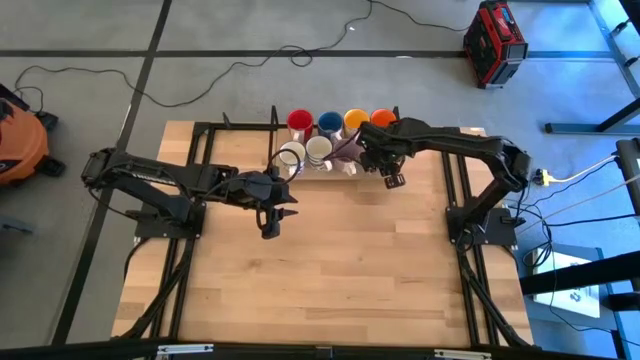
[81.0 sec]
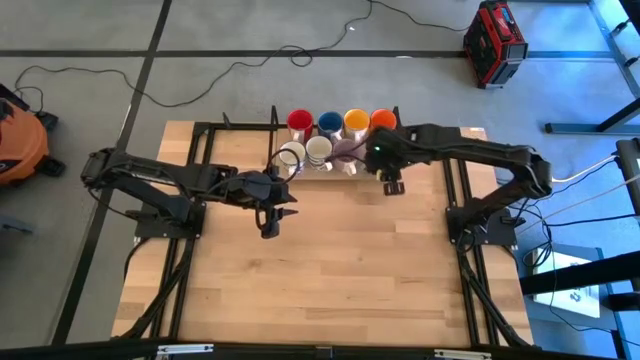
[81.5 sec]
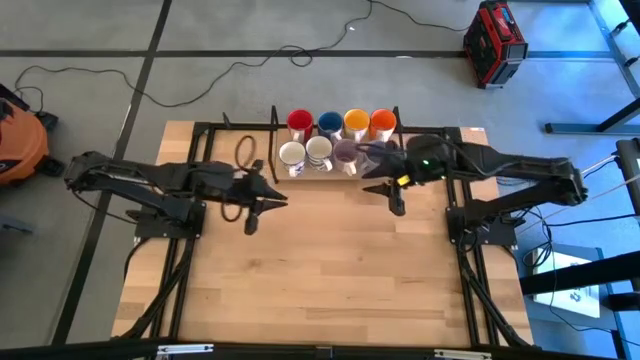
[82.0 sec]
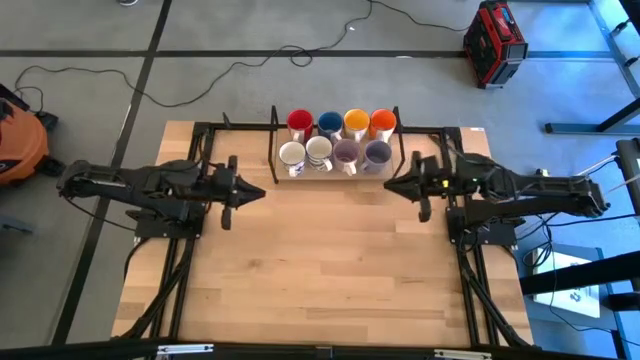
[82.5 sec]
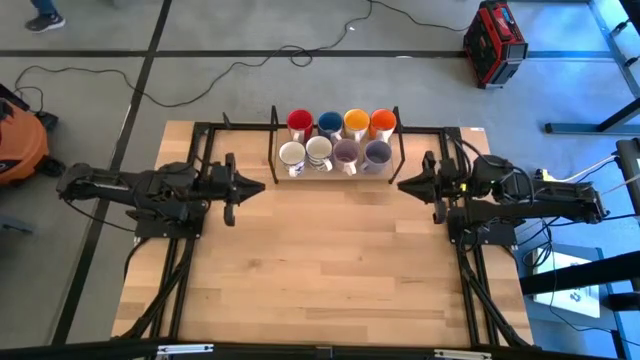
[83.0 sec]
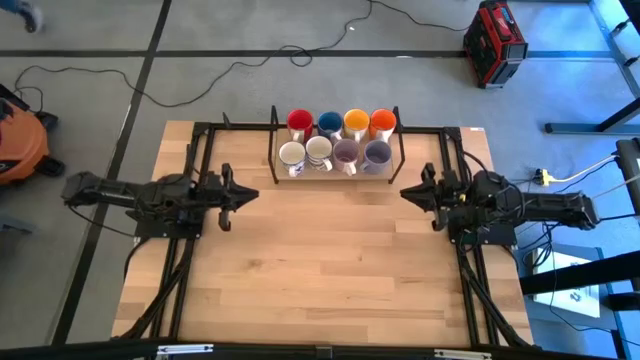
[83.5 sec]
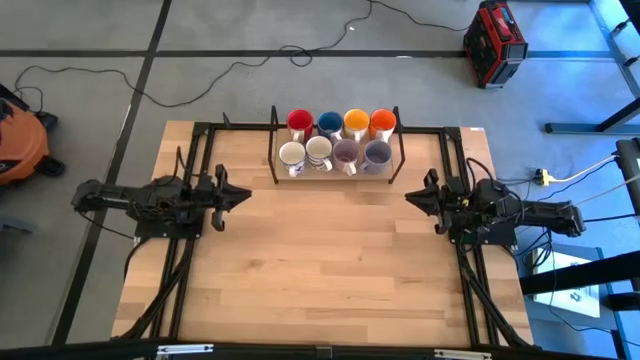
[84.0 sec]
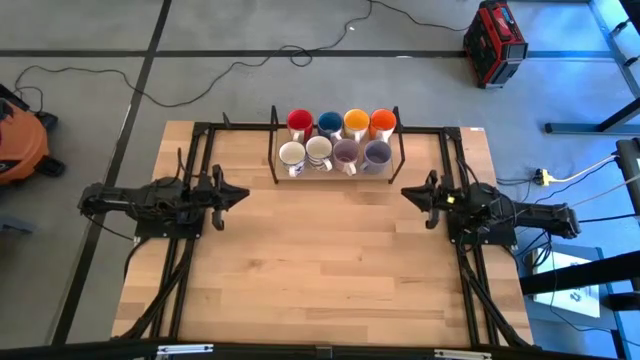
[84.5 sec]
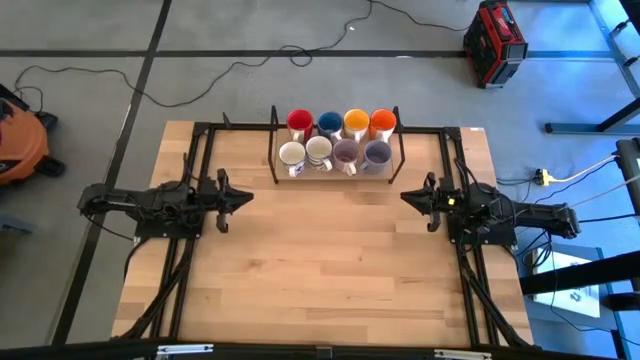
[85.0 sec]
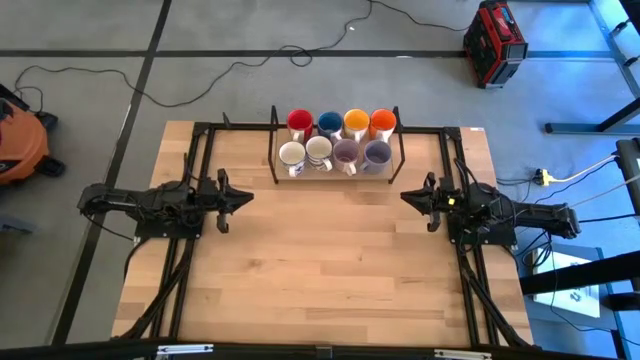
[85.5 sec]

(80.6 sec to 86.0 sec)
Task: Place coffee mugs
Return to Home Position

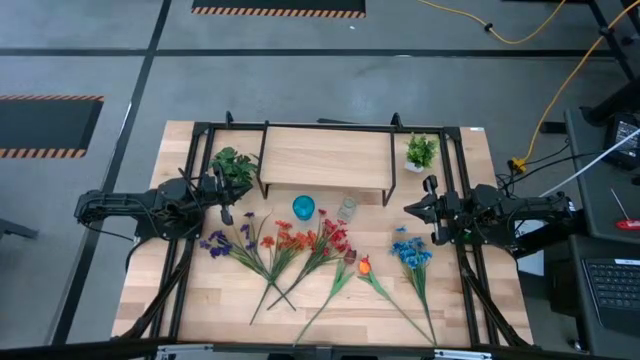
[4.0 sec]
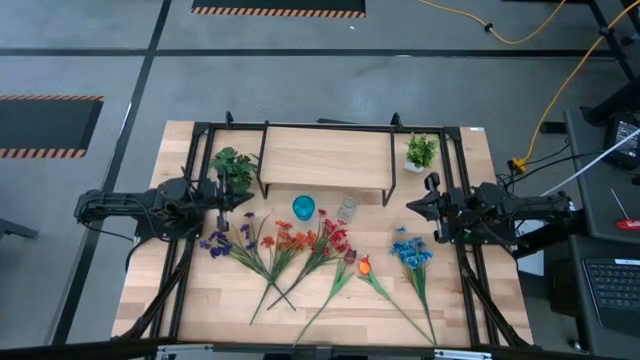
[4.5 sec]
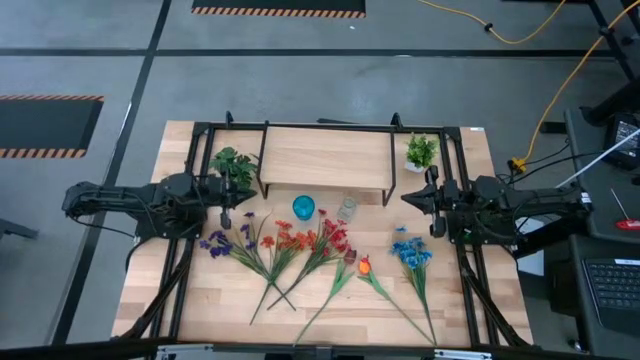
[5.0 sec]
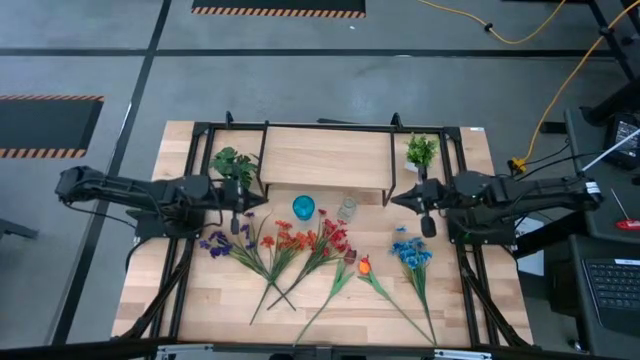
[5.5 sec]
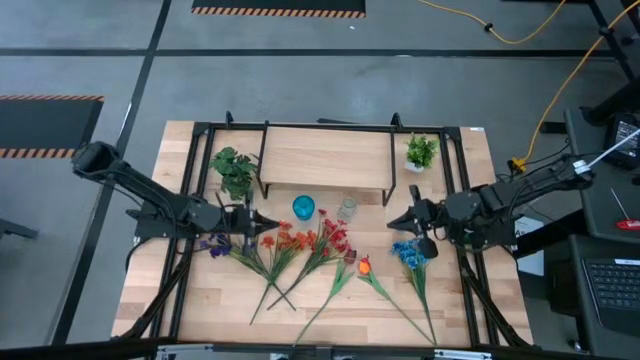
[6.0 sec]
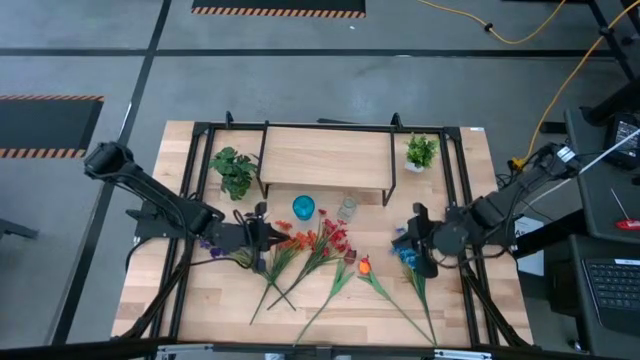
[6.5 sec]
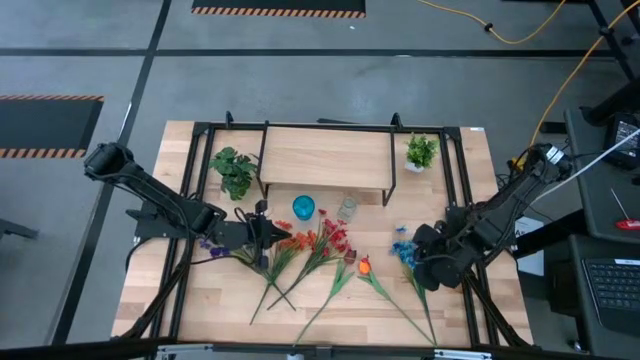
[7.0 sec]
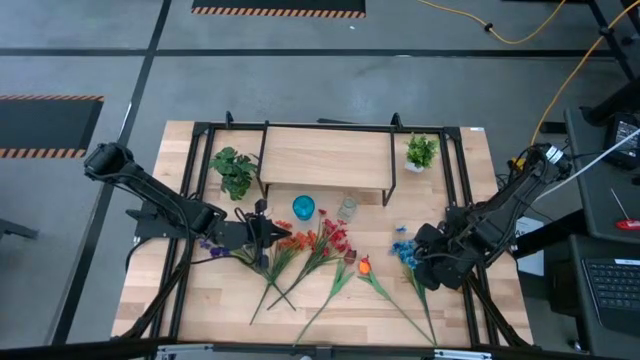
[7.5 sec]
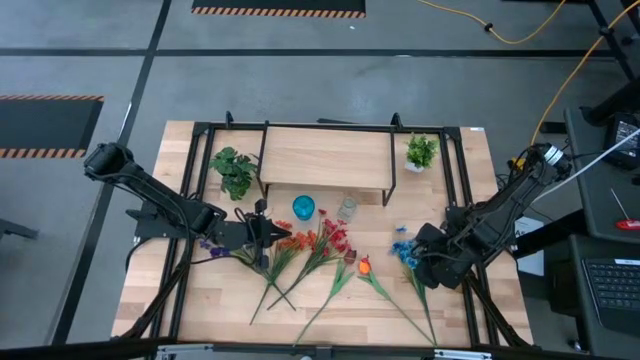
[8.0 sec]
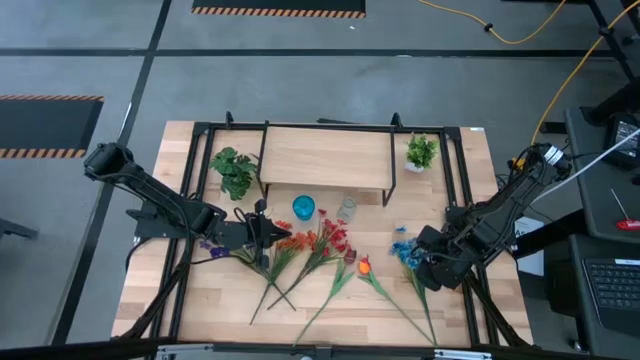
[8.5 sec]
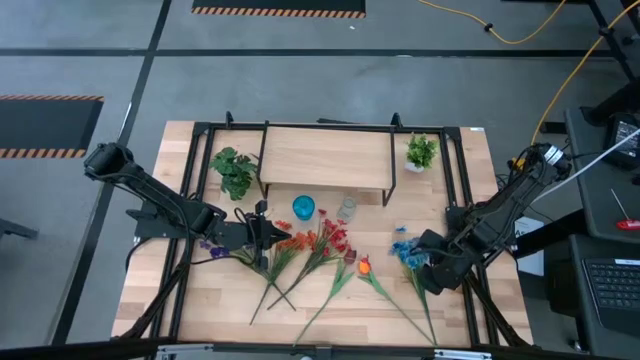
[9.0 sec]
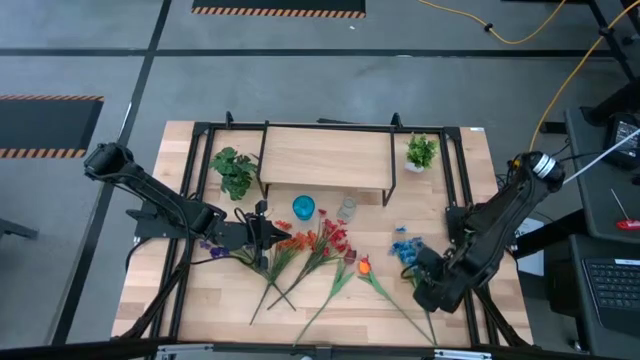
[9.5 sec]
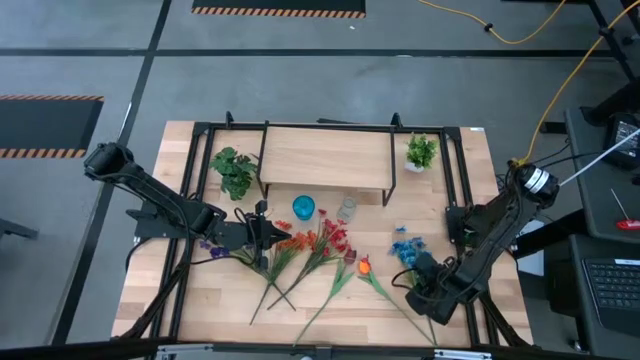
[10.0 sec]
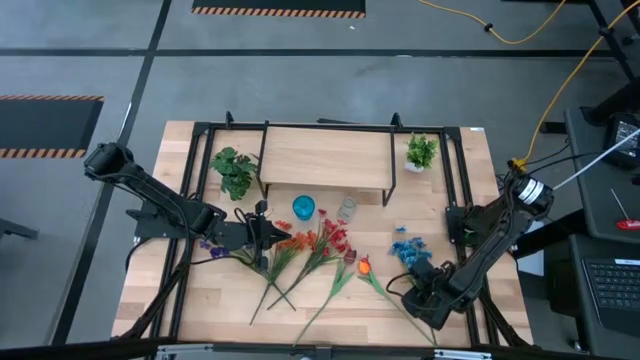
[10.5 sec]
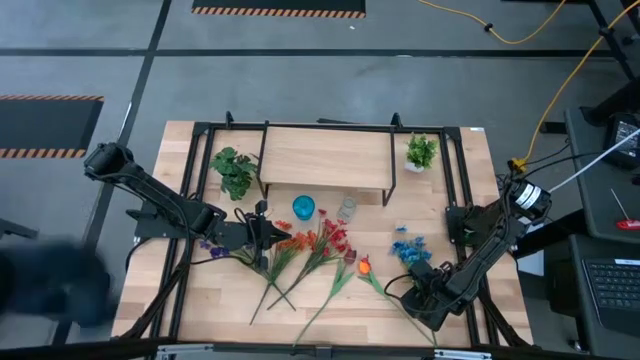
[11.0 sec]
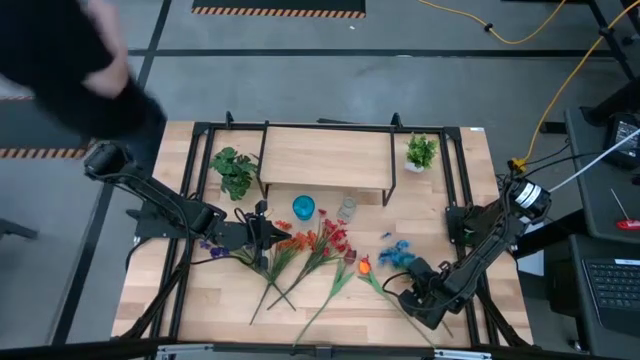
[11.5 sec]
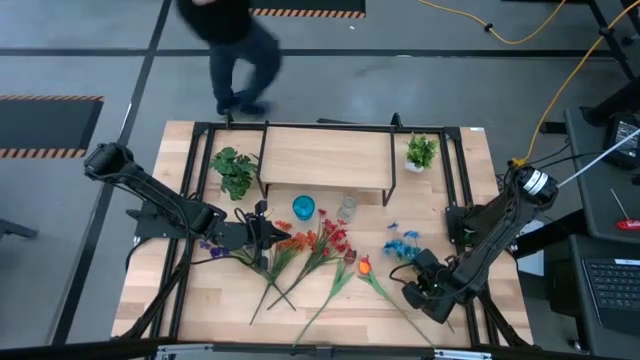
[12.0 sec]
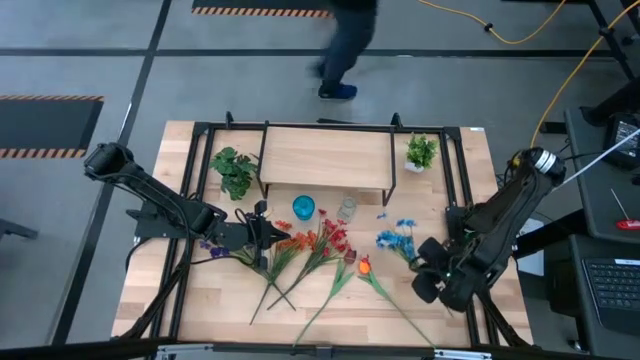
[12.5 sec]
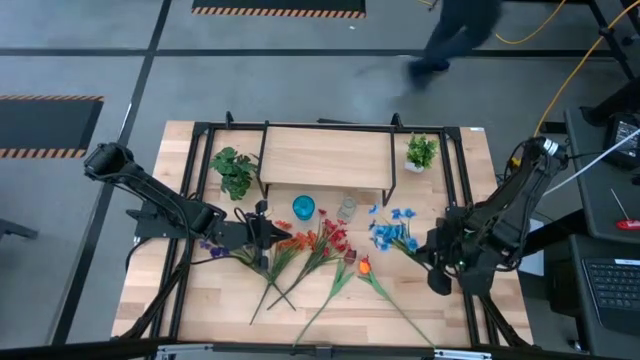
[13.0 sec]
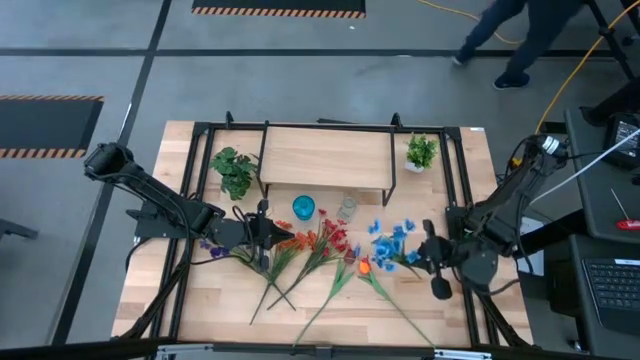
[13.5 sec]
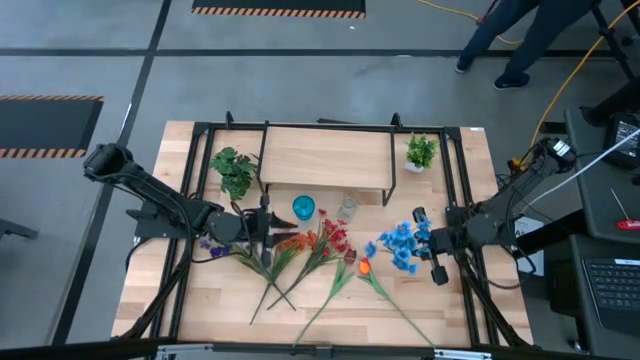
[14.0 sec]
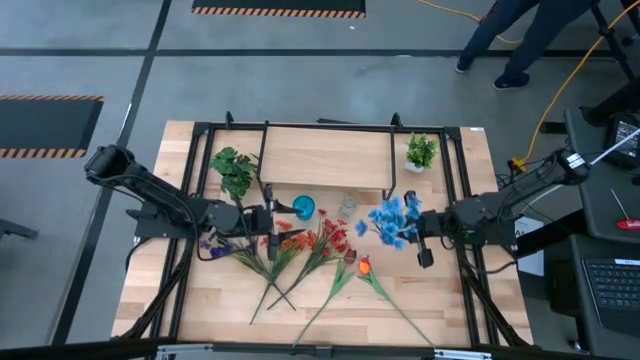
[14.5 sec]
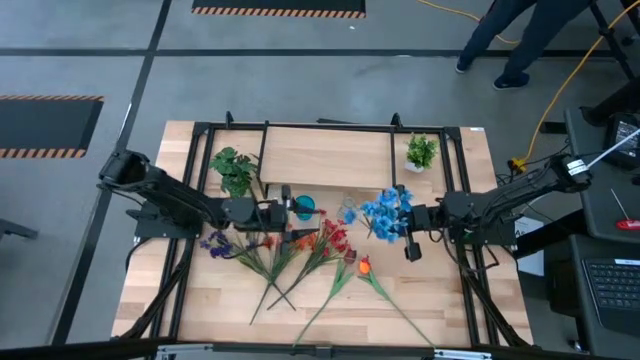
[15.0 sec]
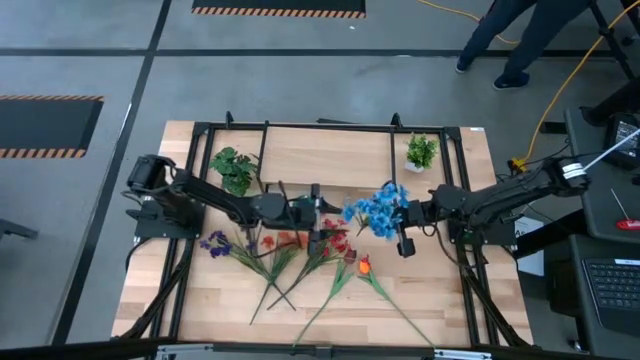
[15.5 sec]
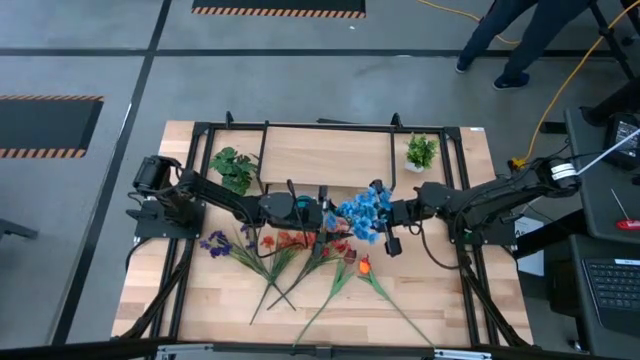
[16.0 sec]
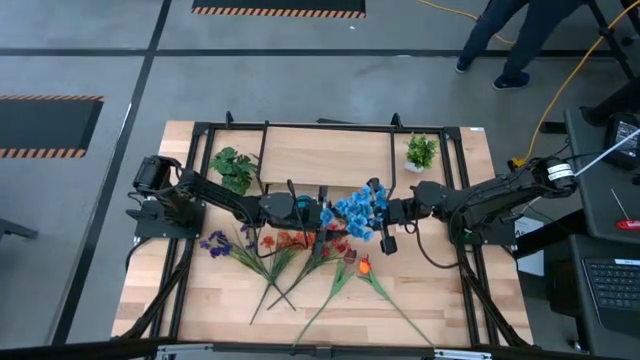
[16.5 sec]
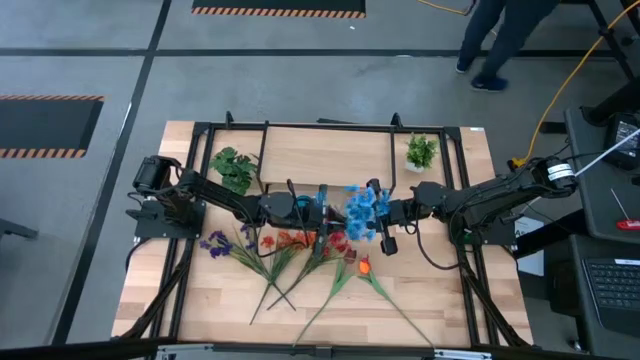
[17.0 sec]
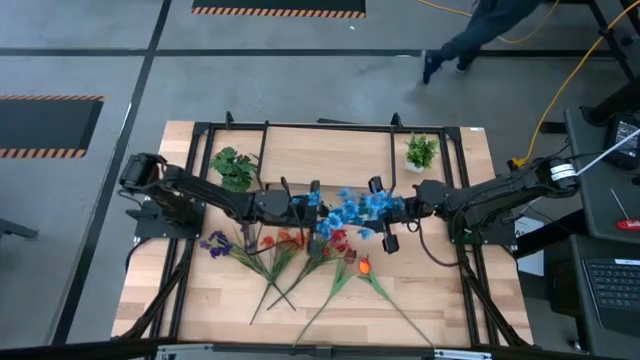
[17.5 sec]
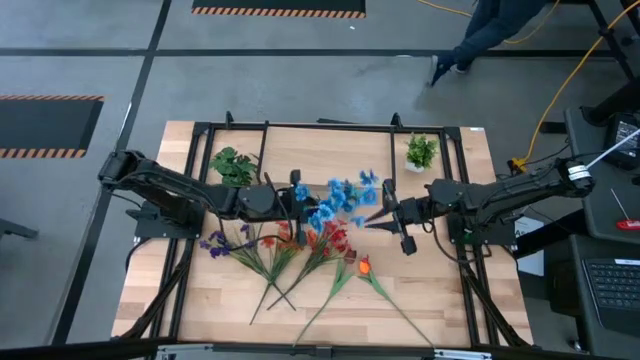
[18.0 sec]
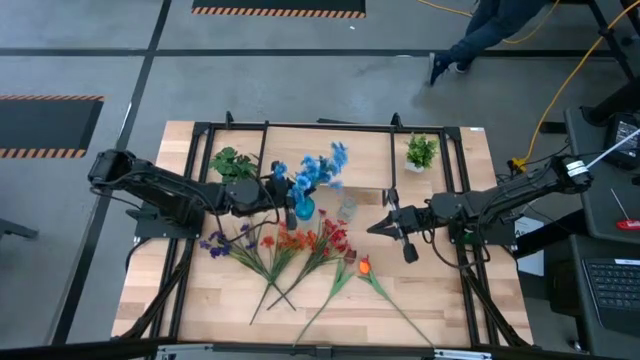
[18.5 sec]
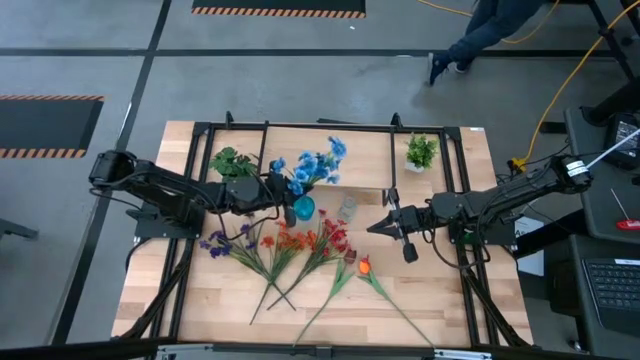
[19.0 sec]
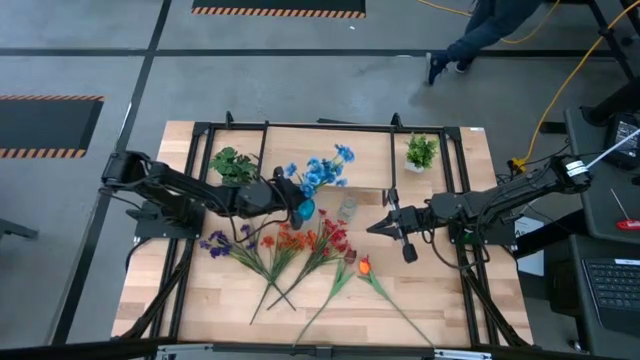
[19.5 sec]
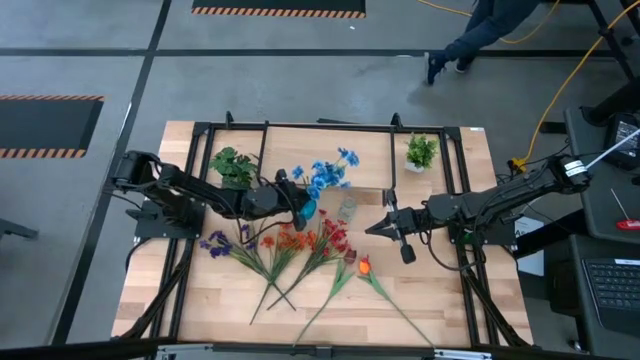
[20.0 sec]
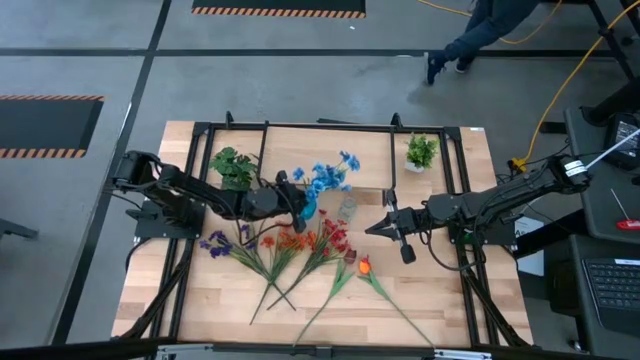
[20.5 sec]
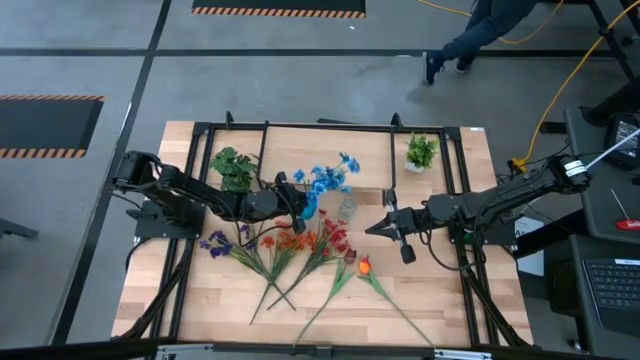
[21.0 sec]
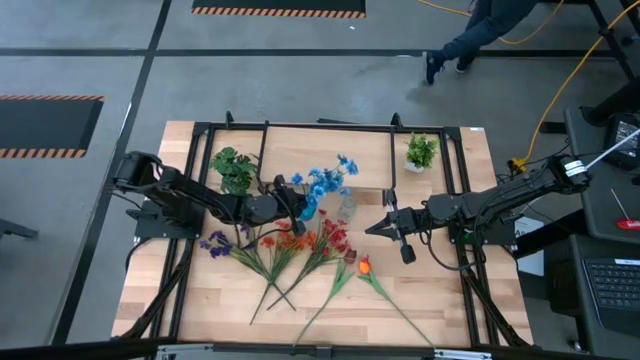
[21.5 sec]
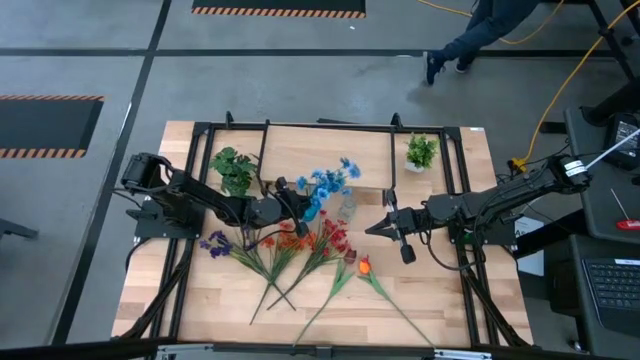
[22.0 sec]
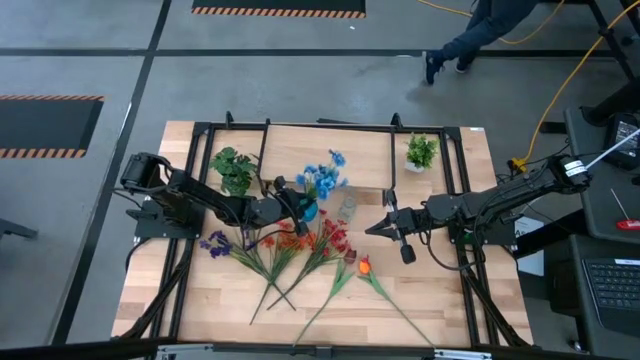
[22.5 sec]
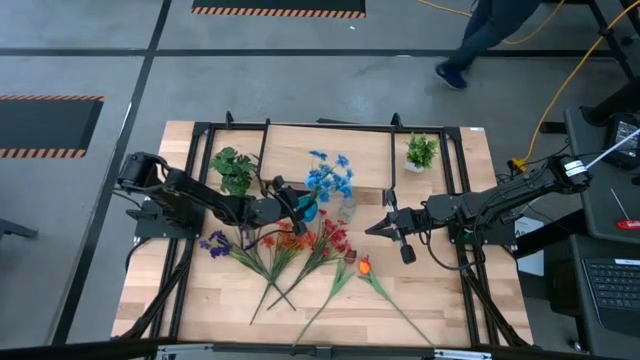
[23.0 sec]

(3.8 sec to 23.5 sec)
Task: Pick and place flowers into a vace then onto a shelf
Put the blue flowers into the blue vase
